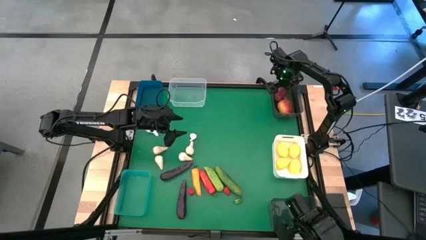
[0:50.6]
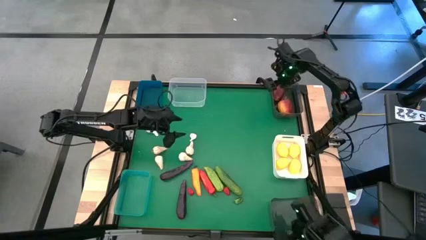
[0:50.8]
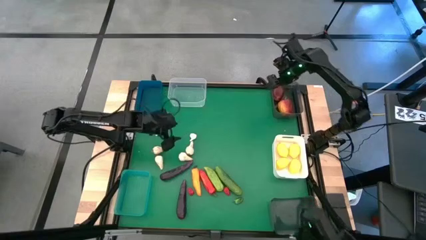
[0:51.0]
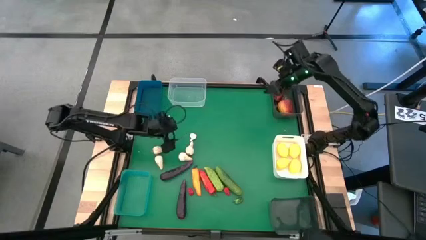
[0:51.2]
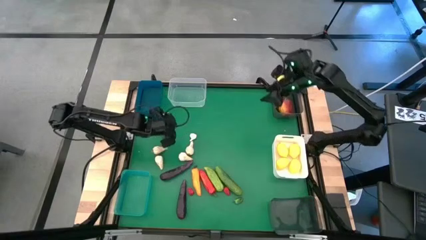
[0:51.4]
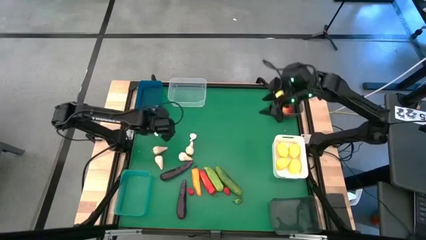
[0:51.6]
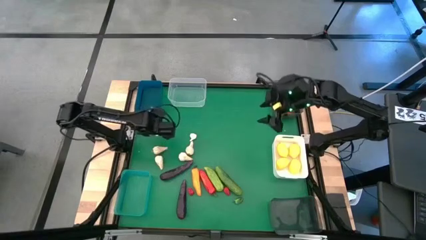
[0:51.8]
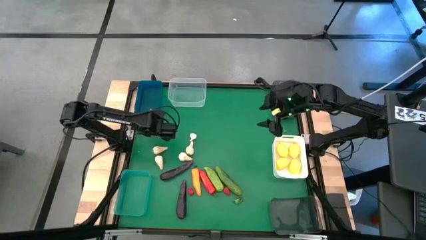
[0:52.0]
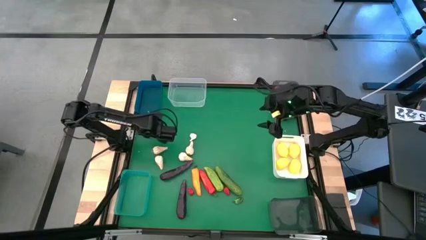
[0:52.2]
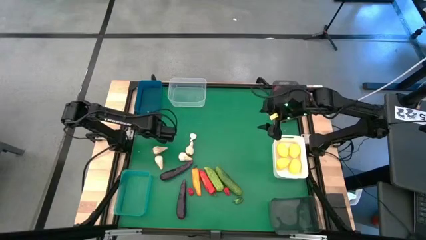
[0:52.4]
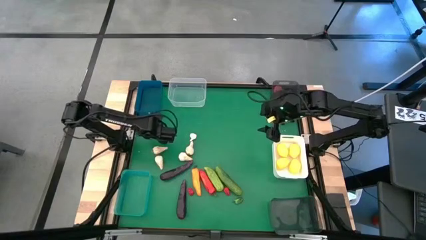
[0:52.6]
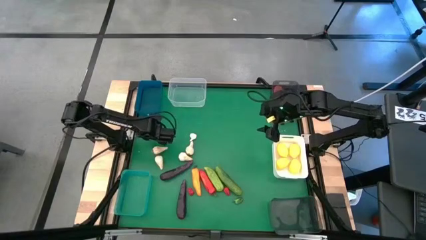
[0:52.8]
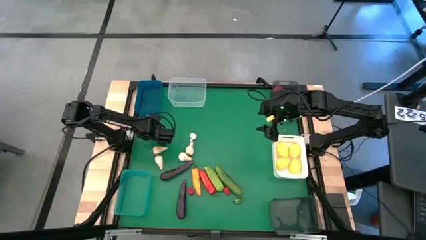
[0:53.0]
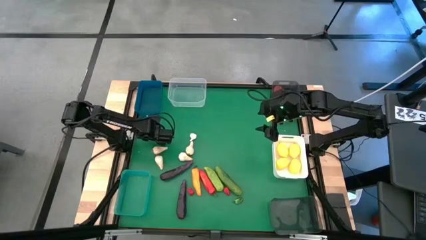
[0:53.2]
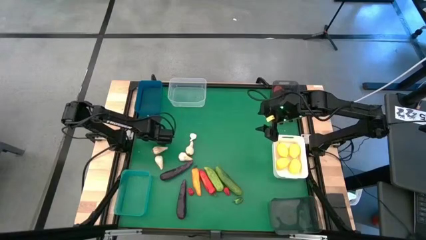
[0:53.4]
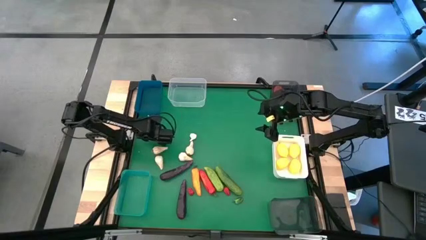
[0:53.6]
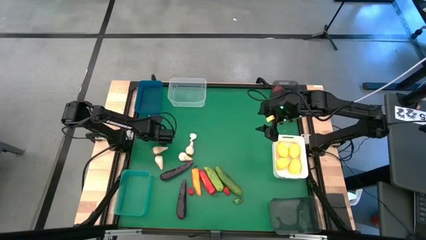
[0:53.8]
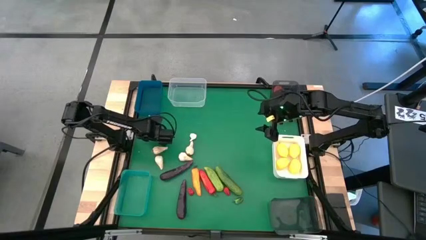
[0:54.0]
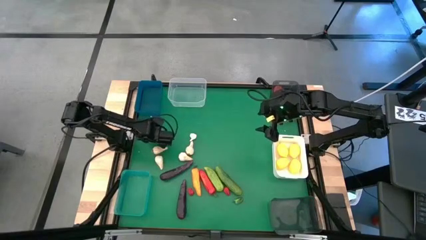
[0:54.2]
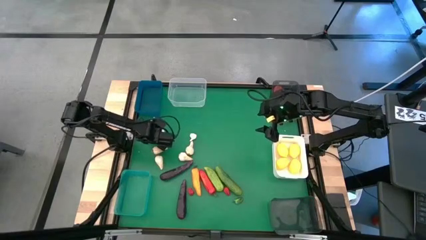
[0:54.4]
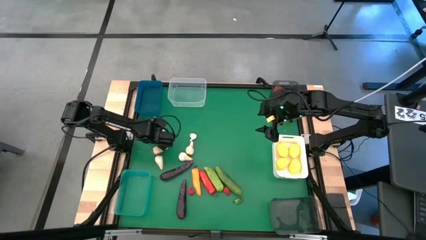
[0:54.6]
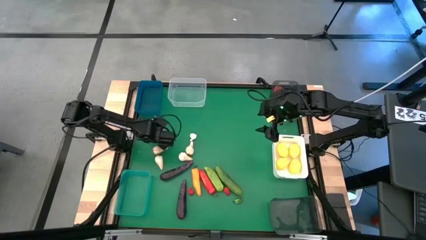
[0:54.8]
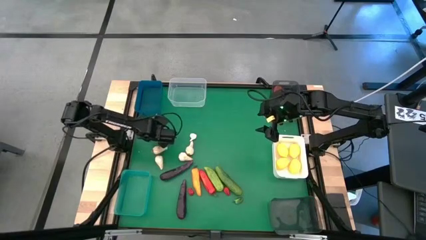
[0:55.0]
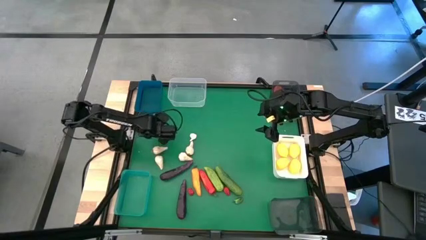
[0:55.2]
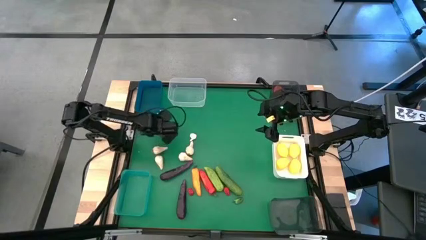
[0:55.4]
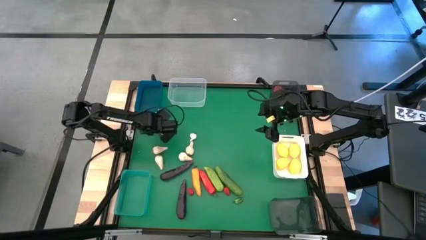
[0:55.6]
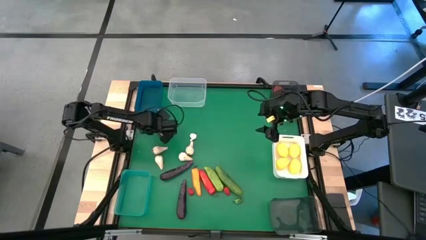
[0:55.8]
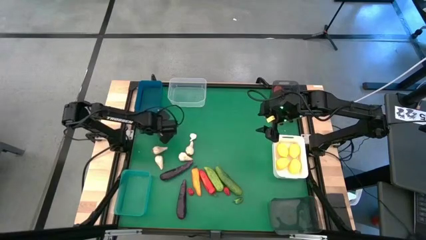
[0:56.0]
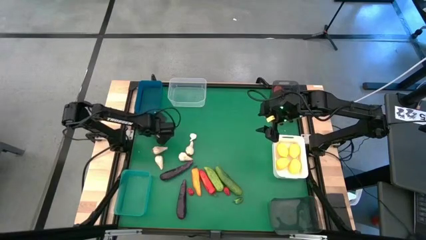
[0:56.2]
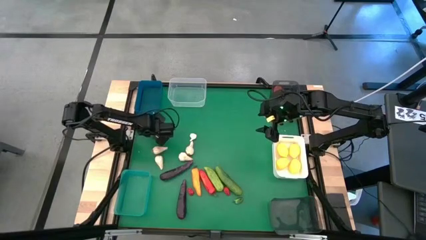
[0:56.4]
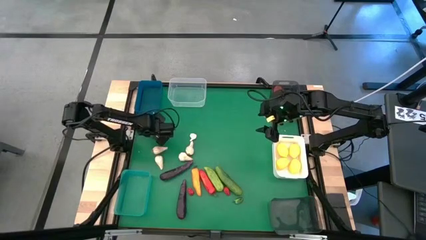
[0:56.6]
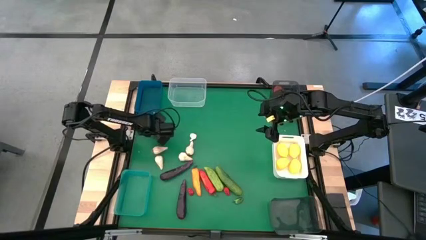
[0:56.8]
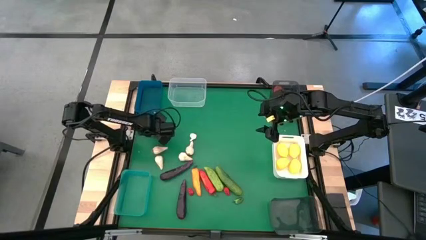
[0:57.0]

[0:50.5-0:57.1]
Task: Sort produce into baskets
Put the white garlic into the transparent bin

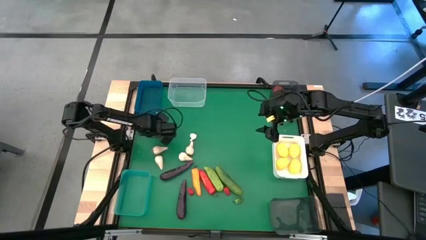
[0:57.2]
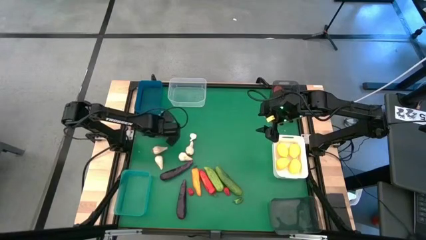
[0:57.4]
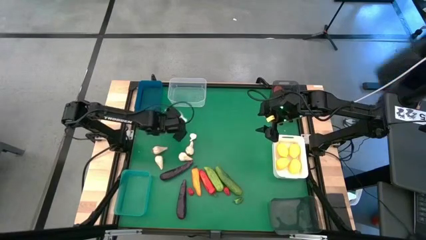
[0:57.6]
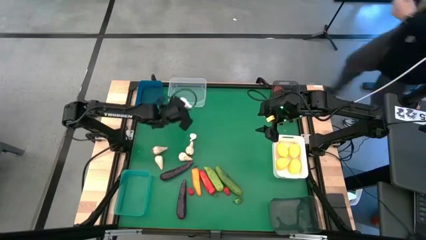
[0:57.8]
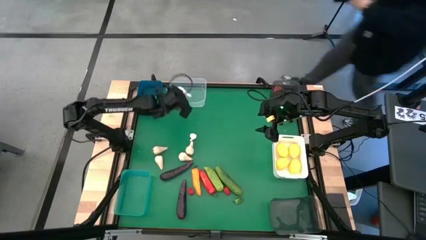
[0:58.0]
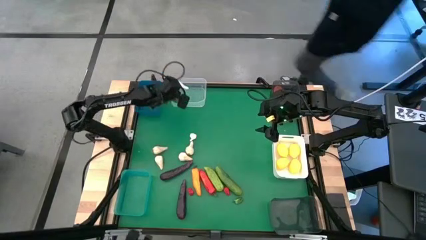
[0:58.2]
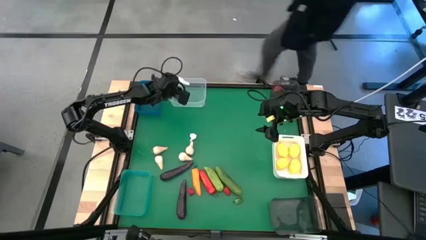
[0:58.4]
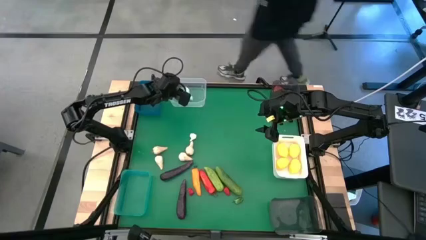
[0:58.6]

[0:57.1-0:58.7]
Put the white garlic into the transparent bin

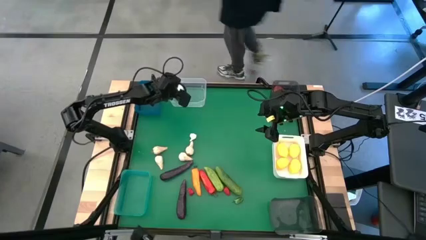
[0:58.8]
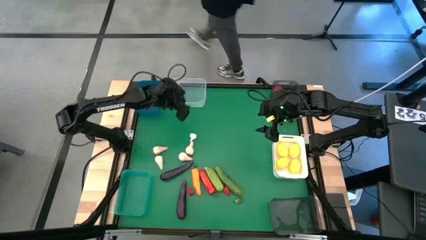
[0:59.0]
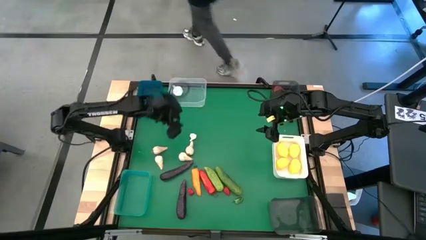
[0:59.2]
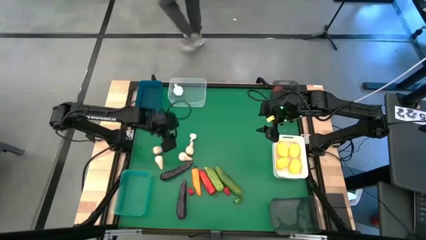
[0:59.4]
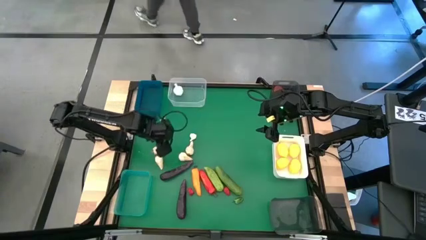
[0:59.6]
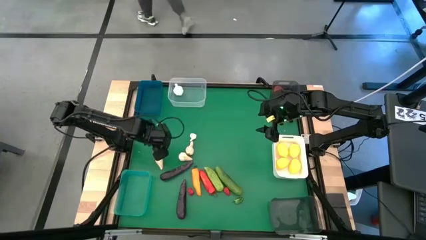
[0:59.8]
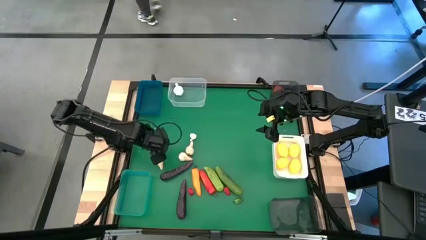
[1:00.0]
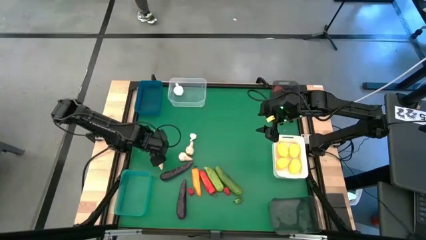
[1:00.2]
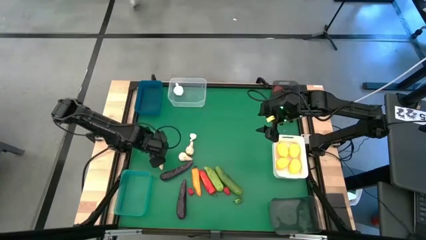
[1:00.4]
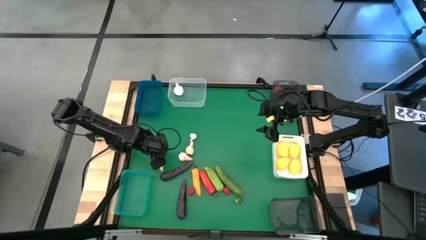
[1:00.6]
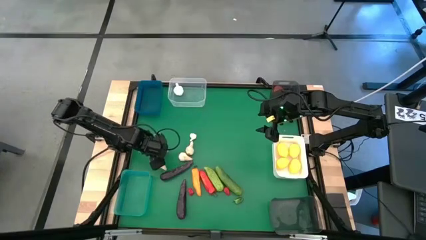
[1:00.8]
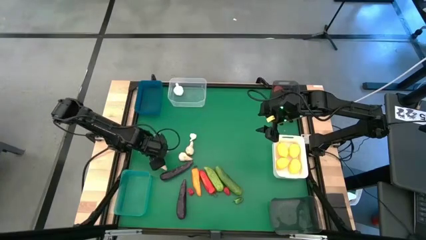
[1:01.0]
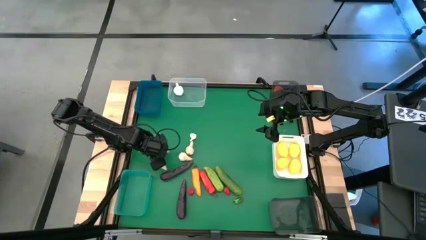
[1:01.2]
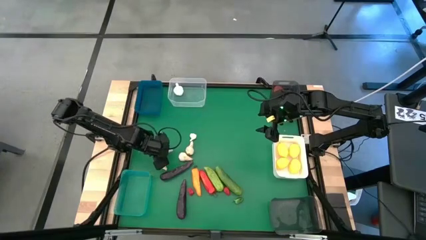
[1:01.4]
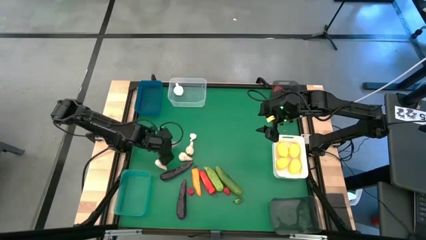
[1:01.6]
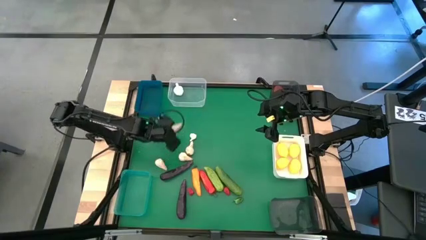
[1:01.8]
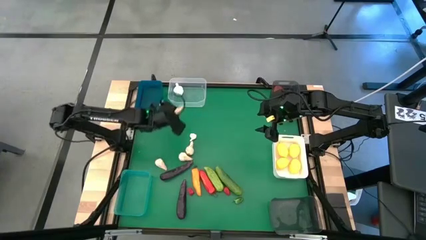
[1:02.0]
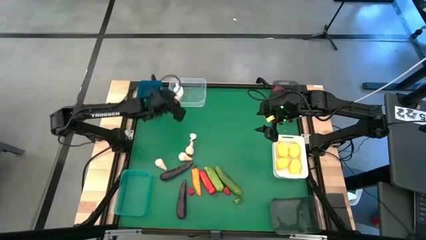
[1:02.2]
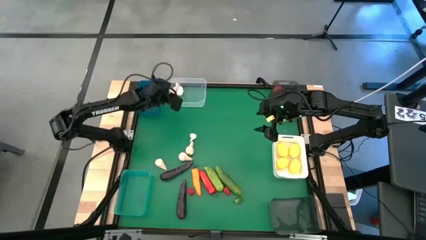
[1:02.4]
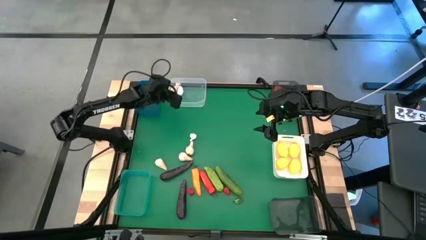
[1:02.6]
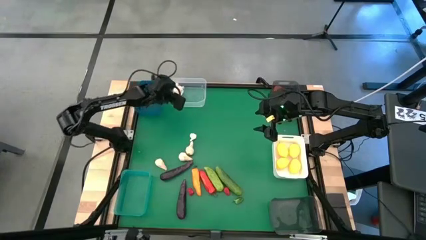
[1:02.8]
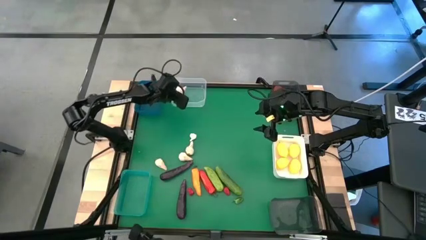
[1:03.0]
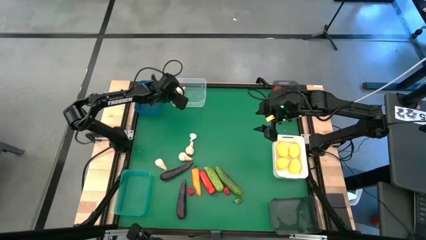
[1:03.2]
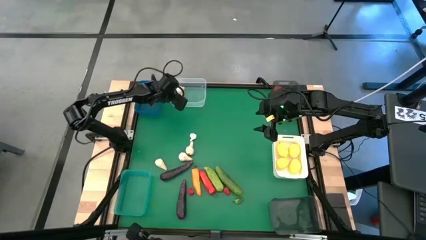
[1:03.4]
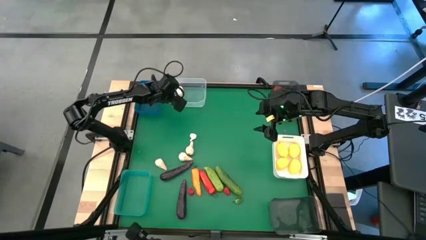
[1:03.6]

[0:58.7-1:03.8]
Put the white garlic into the transparent bin

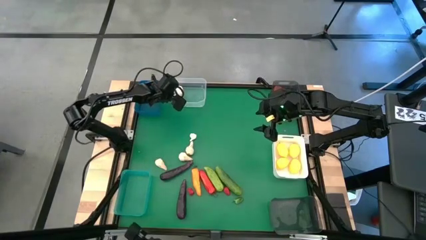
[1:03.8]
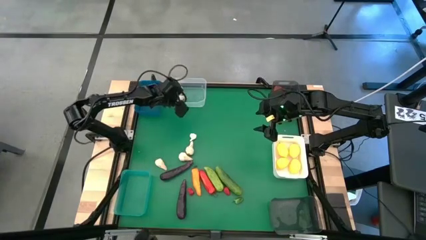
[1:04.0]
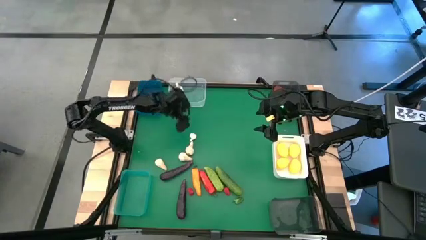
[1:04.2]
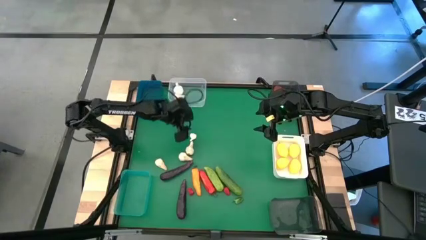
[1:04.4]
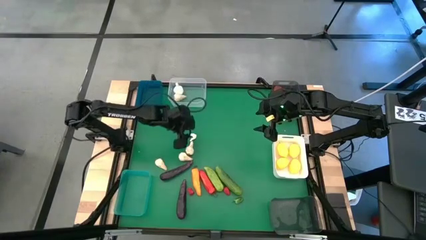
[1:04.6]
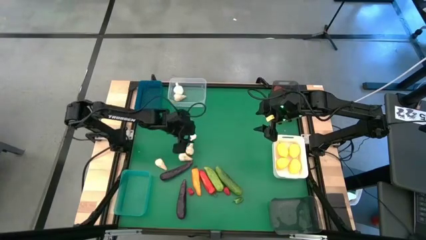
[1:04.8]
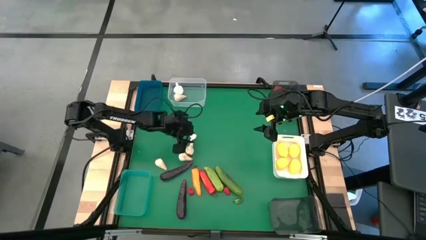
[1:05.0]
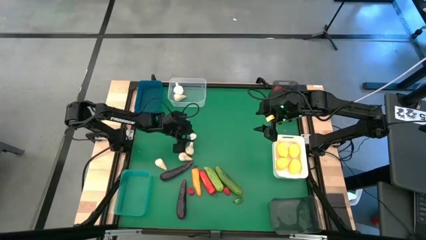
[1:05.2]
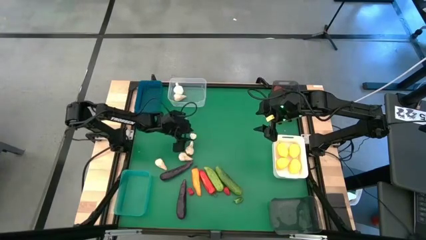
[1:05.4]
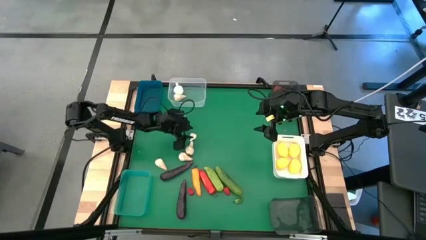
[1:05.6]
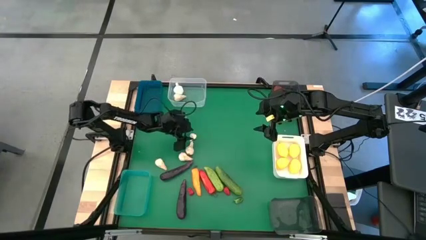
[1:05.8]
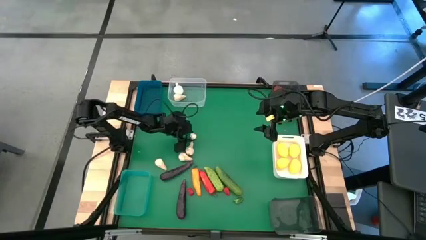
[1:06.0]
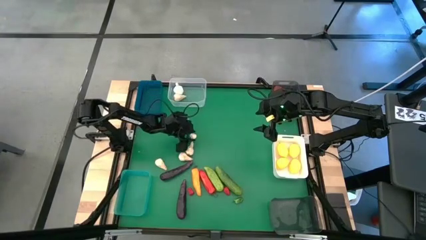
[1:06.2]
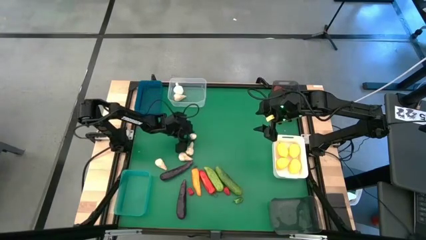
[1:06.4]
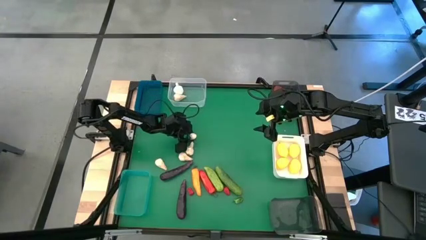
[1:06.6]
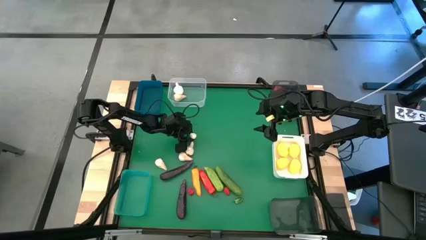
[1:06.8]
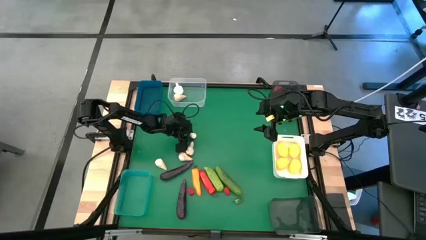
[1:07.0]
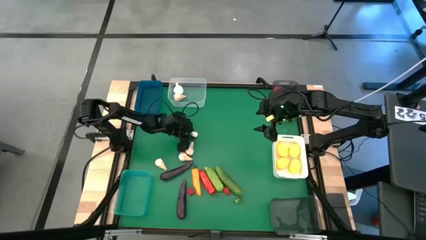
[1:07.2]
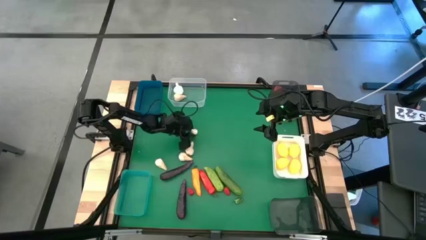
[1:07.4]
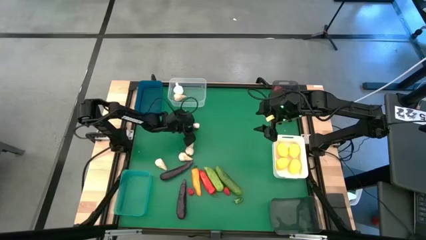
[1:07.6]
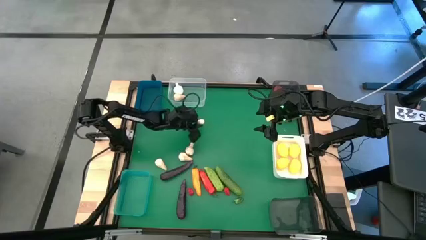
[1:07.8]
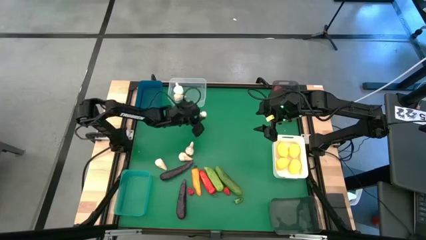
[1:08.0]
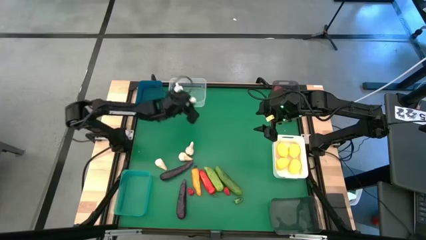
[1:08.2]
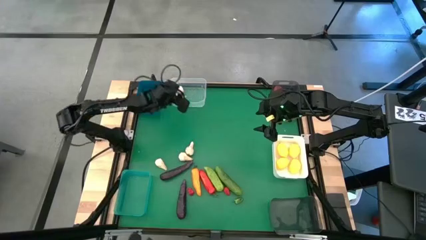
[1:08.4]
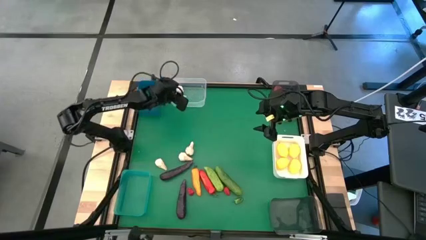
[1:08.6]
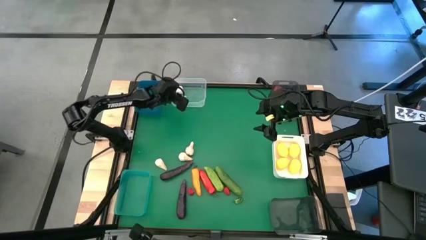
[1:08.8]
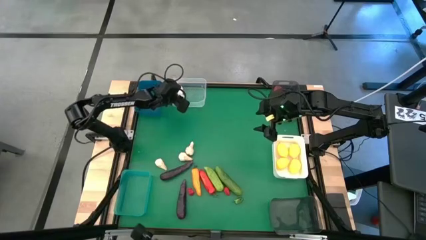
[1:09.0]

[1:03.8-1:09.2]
Put the white garlic into the transparent bin
